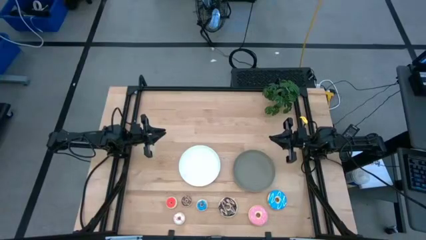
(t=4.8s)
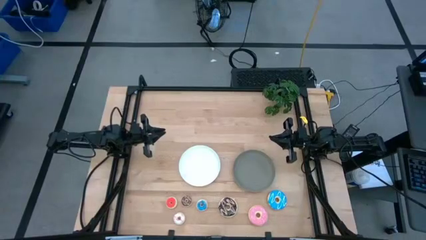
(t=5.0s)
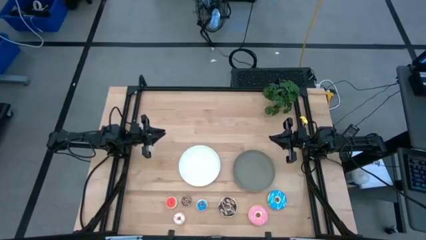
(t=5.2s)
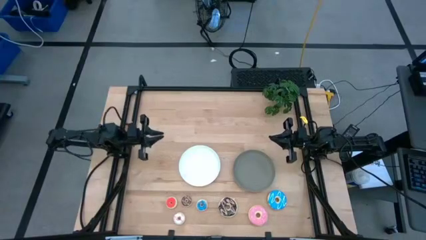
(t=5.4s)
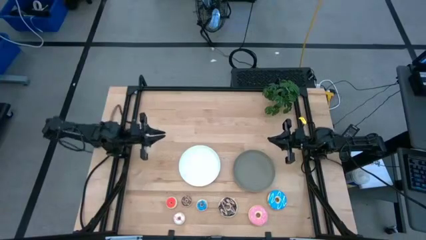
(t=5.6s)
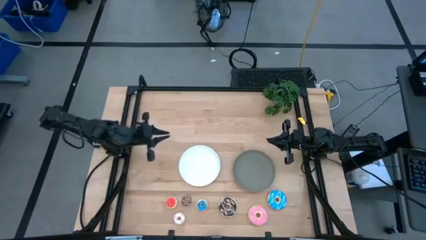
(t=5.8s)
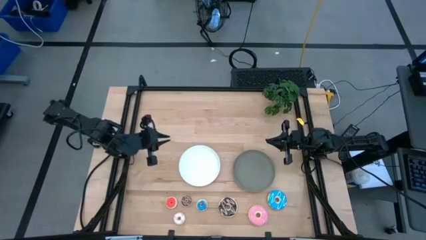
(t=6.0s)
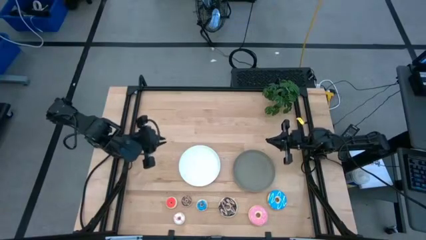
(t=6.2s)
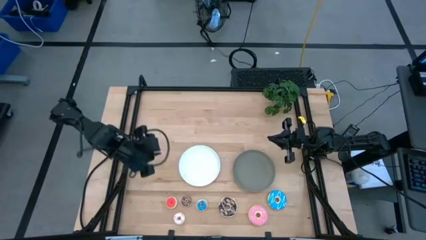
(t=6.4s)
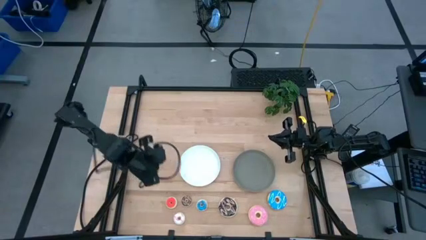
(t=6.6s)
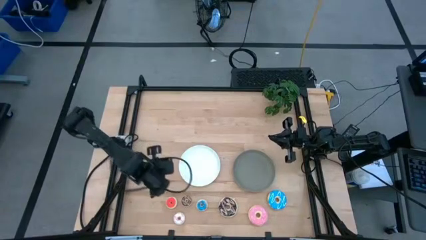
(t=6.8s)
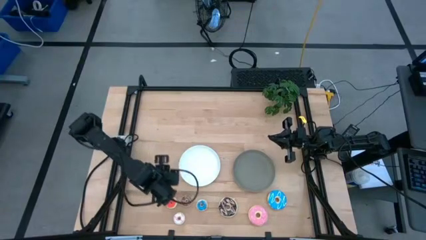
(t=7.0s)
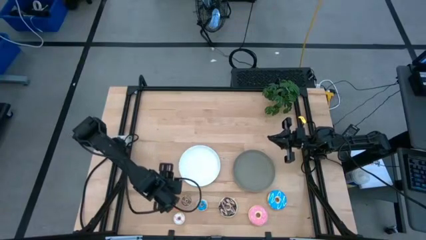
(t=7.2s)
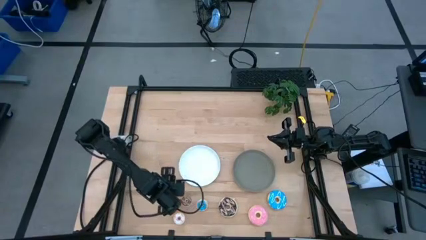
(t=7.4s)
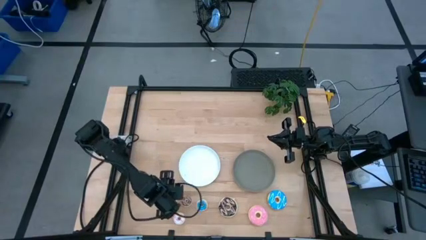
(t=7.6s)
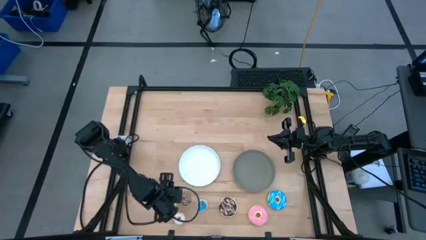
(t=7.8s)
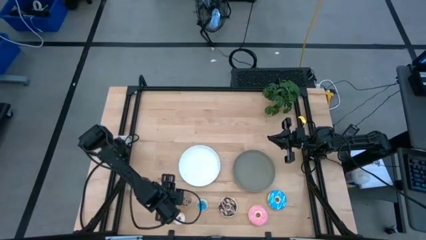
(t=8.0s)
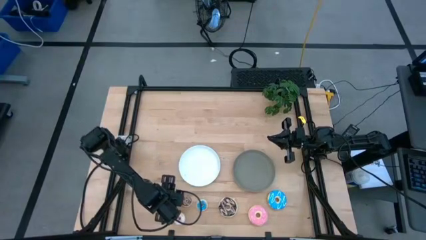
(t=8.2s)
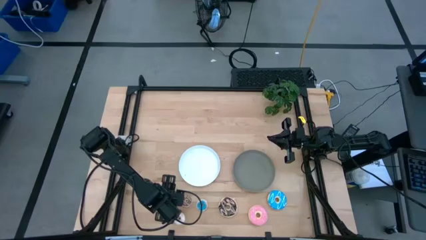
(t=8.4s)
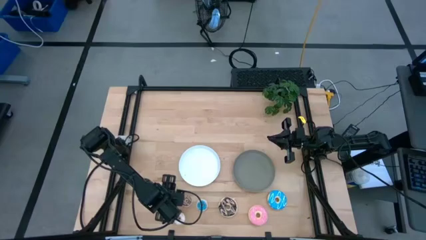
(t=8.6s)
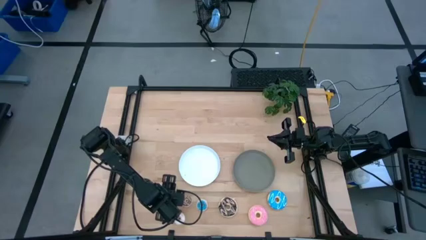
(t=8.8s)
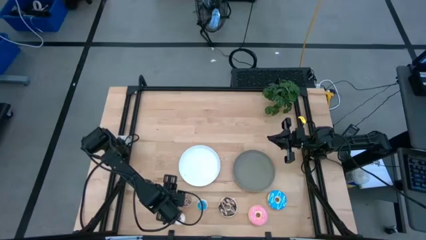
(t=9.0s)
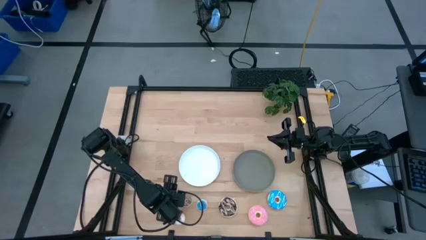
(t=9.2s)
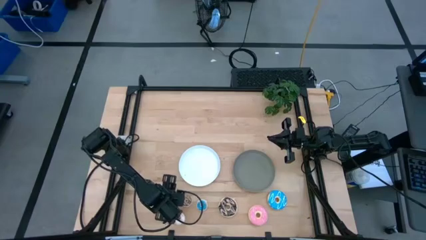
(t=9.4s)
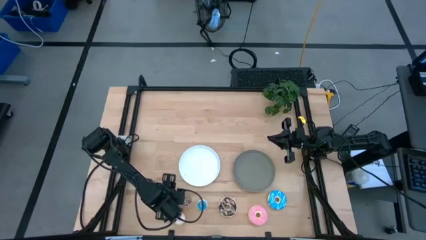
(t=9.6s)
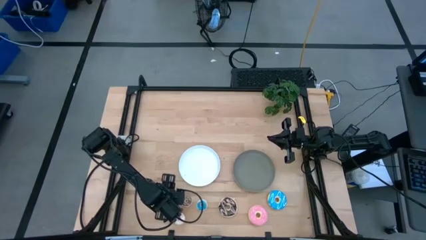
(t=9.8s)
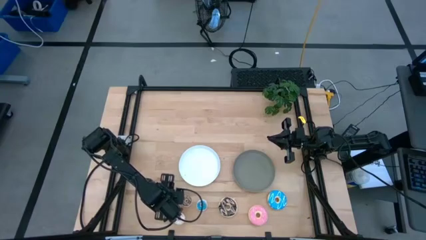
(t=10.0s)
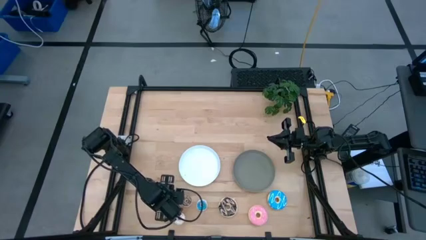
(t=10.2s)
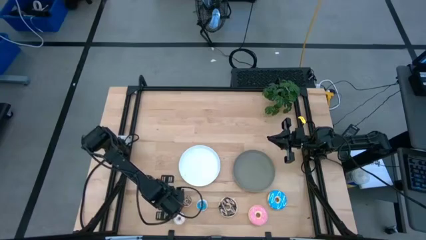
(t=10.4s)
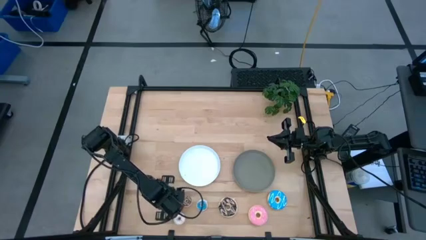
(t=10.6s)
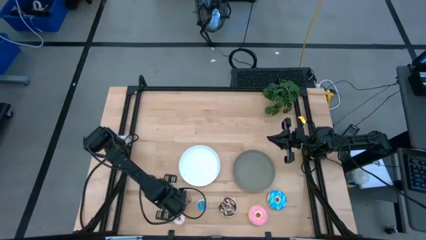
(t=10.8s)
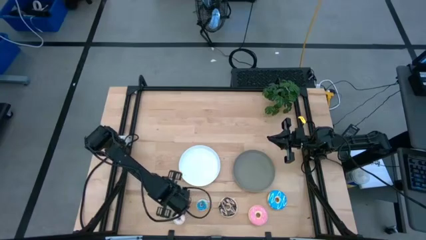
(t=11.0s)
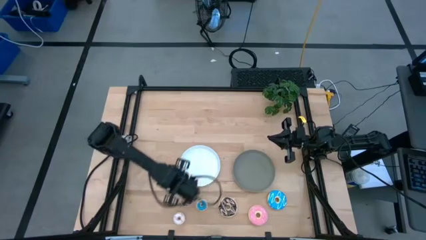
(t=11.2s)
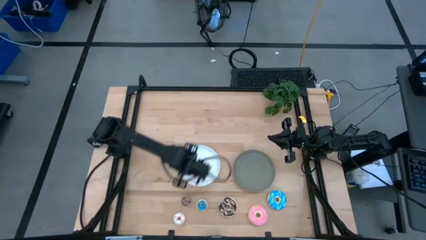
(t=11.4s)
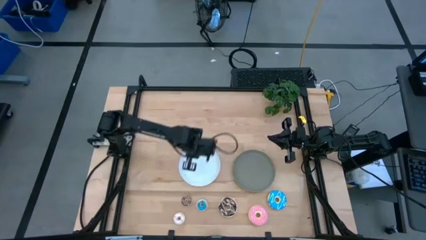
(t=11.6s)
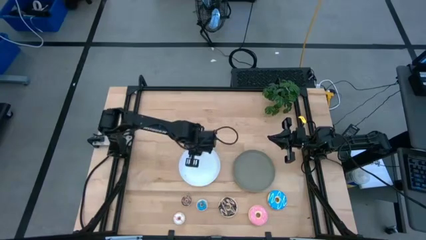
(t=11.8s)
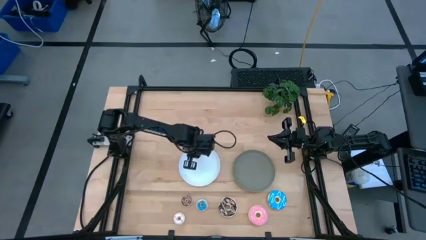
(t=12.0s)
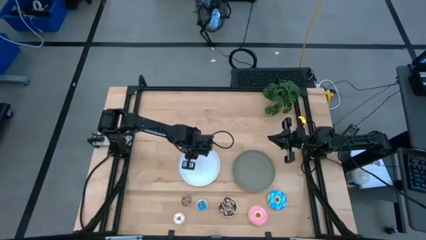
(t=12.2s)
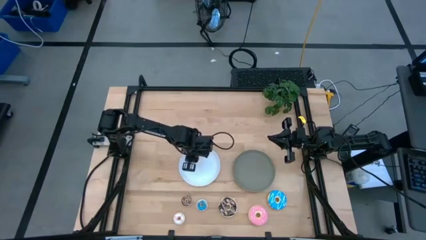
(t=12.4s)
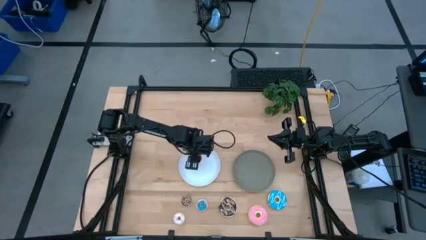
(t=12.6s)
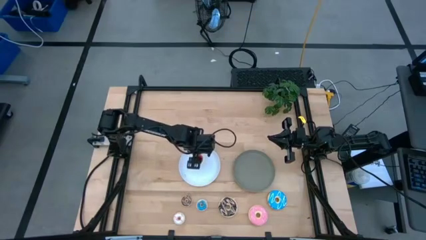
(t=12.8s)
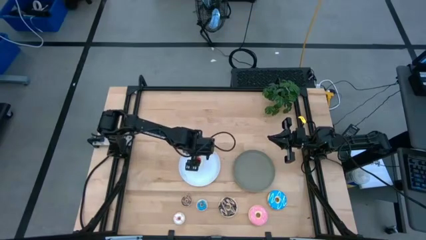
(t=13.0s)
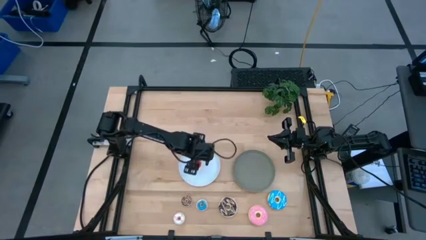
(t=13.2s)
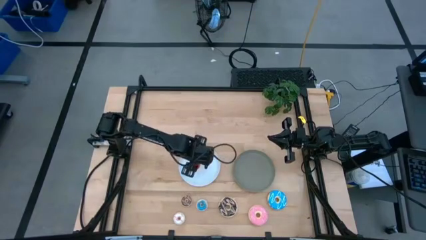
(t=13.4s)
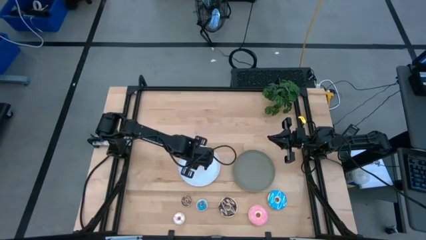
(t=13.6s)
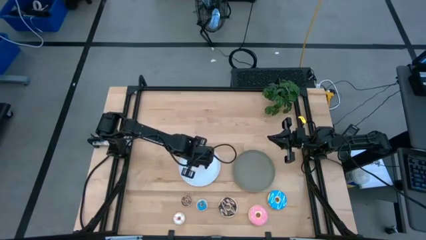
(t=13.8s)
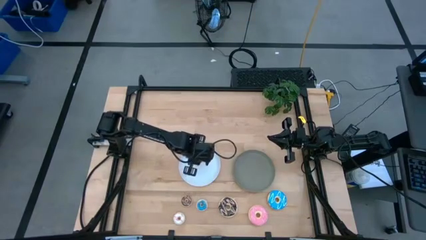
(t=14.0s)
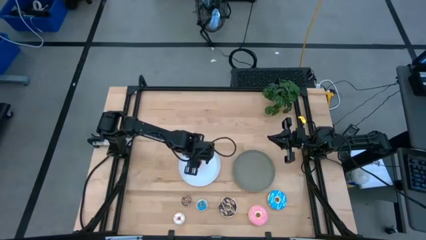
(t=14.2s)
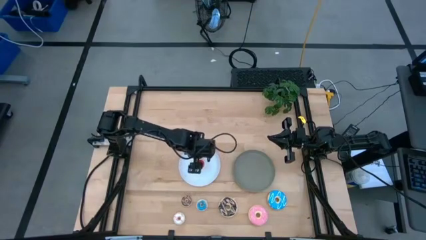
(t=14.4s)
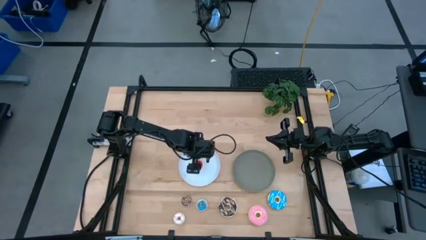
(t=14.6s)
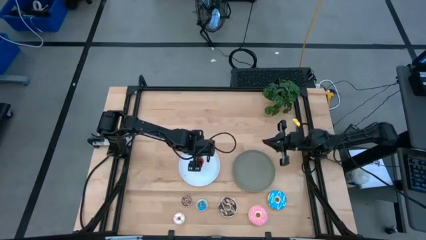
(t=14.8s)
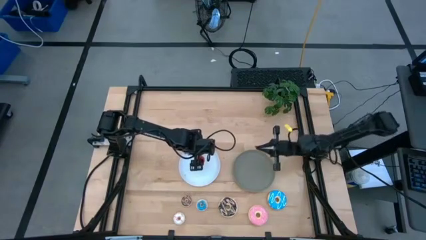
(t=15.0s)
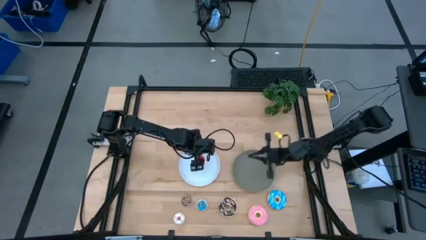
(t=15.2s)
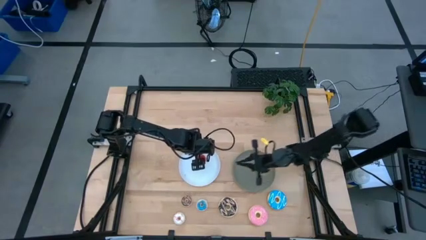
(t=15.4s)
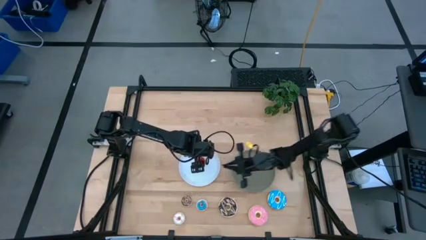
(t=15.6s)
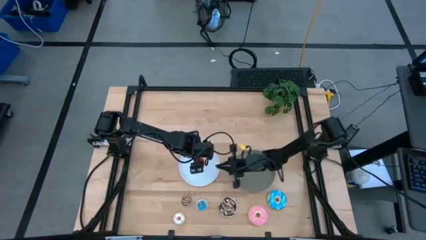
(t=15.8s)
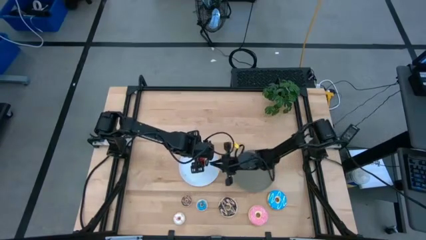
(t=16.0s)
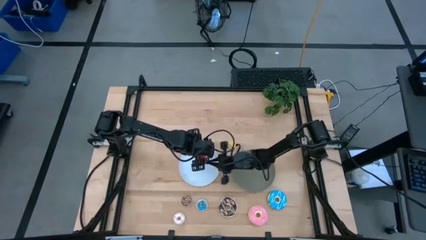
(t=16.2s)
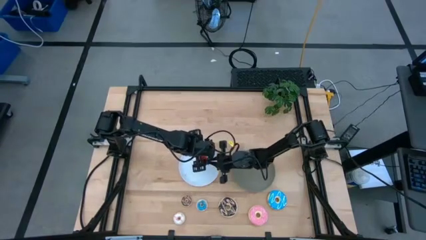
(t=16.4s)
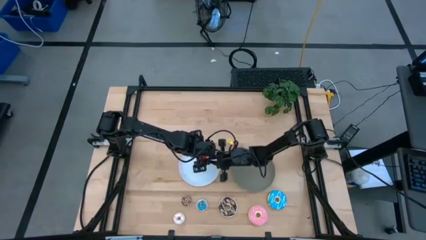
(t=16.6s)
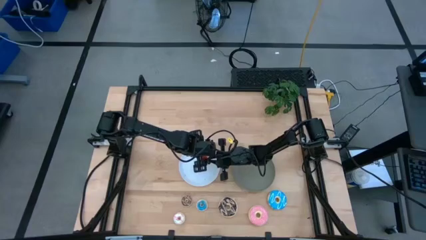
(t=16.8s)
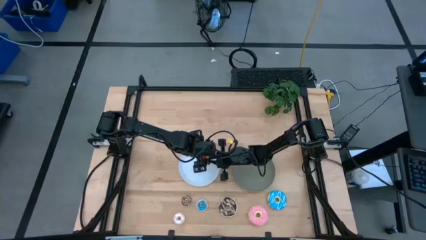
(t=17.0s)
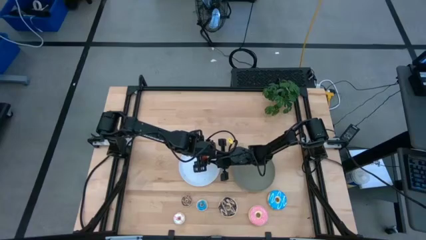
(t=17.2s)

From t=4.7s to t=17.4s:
Task: Pick & Place donuts
Put the small orange donut on the white plate
